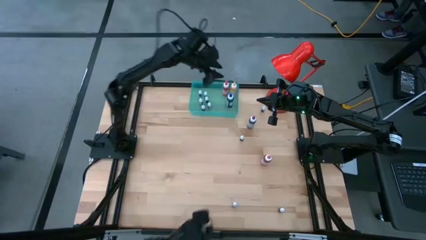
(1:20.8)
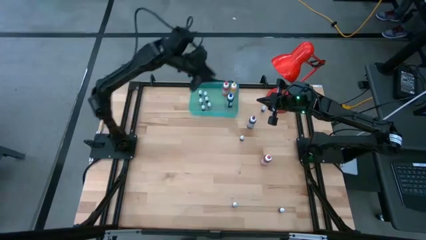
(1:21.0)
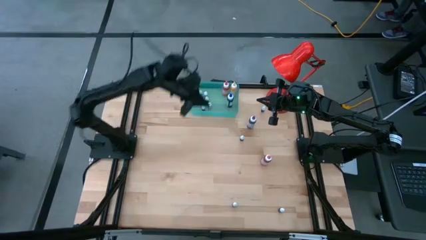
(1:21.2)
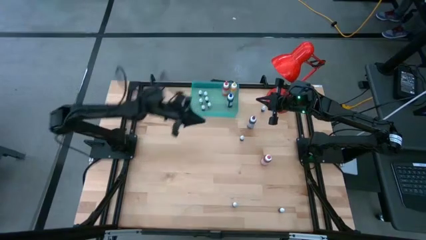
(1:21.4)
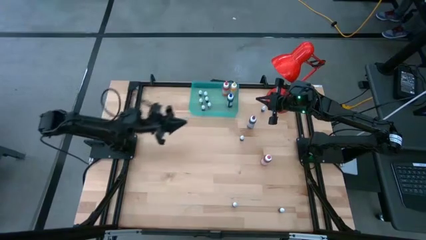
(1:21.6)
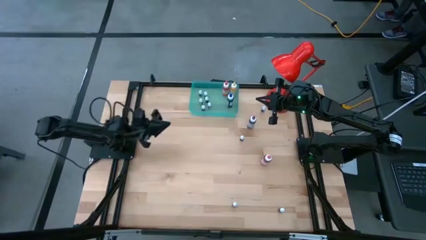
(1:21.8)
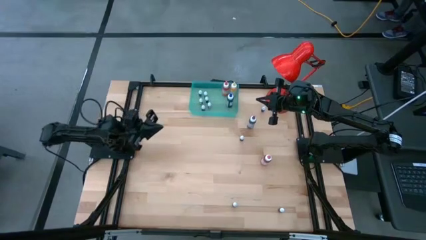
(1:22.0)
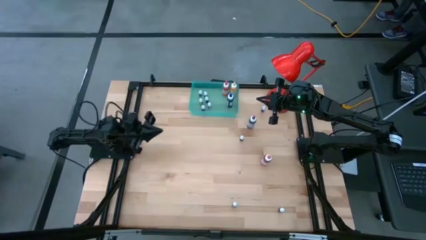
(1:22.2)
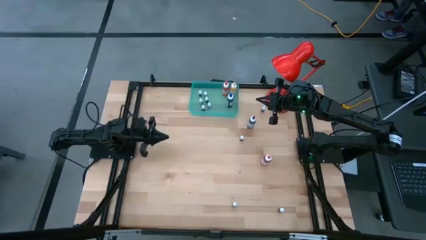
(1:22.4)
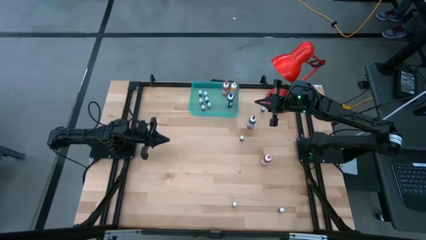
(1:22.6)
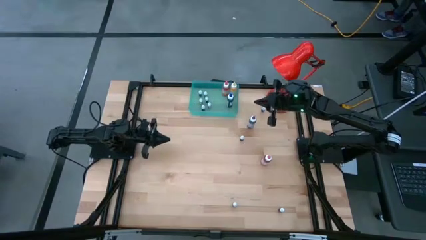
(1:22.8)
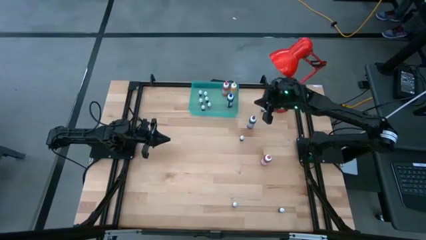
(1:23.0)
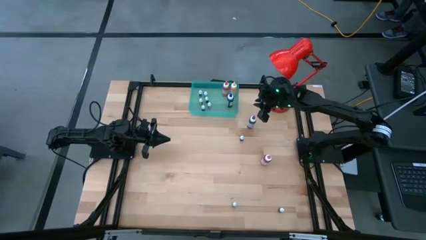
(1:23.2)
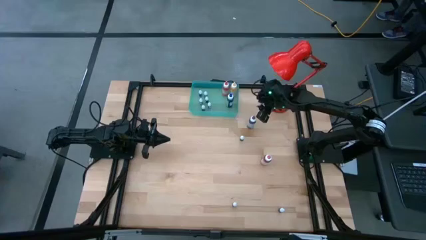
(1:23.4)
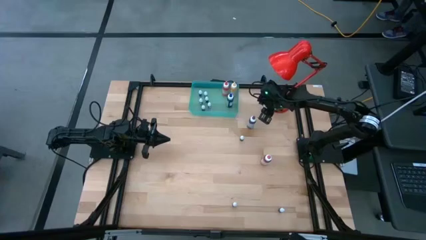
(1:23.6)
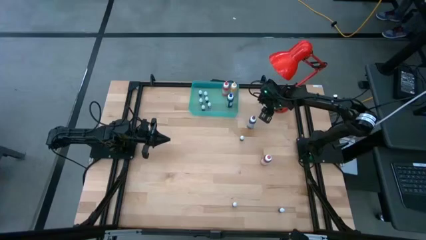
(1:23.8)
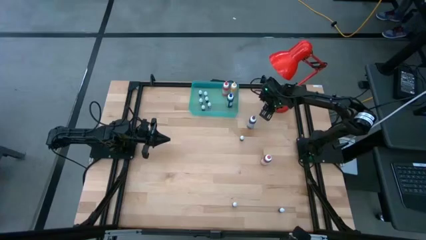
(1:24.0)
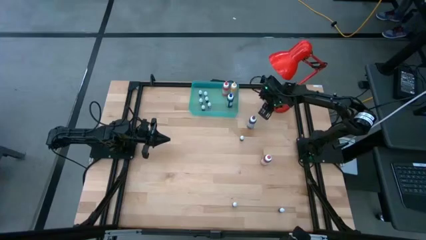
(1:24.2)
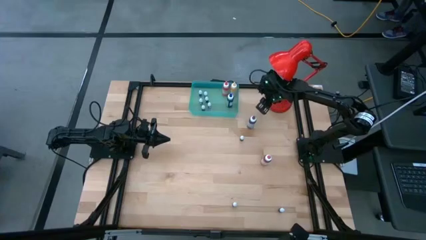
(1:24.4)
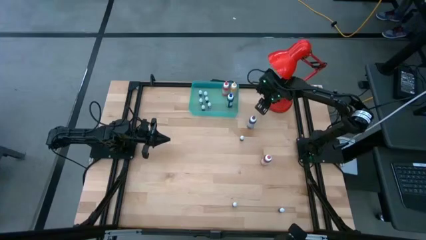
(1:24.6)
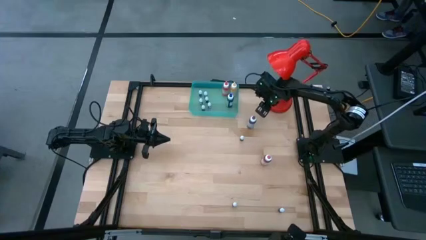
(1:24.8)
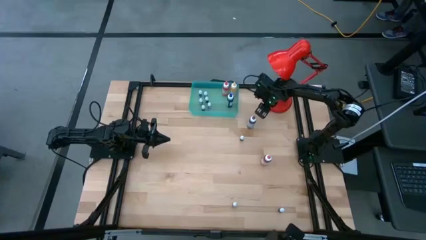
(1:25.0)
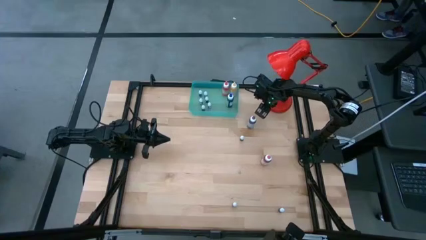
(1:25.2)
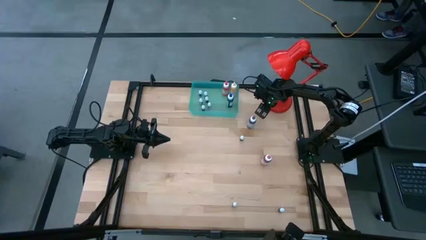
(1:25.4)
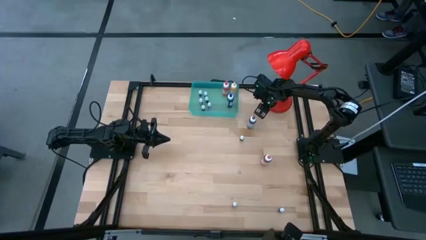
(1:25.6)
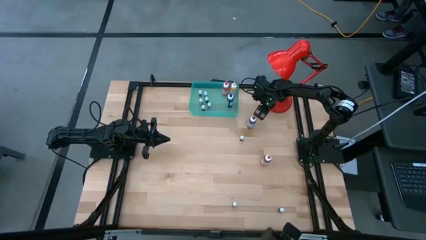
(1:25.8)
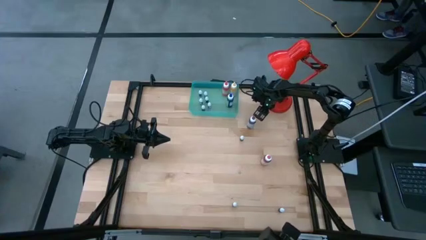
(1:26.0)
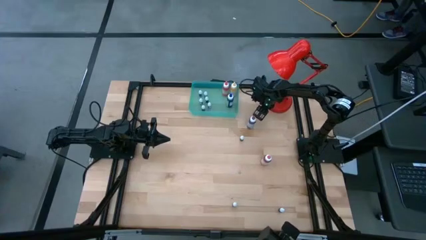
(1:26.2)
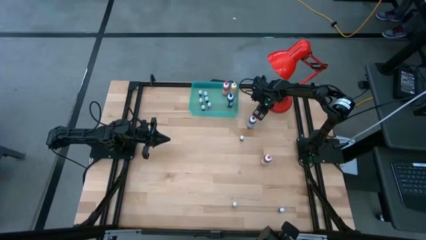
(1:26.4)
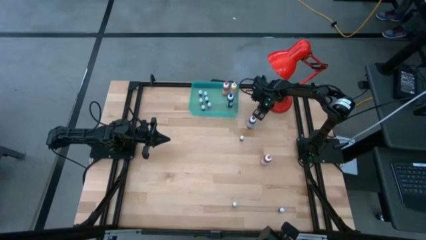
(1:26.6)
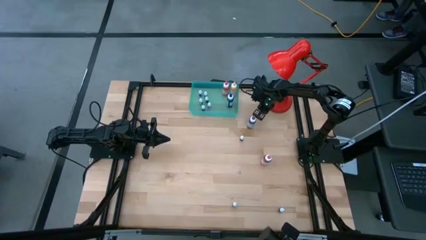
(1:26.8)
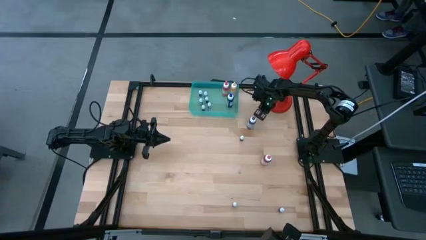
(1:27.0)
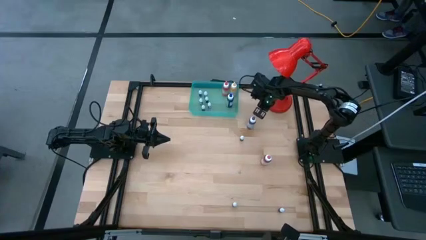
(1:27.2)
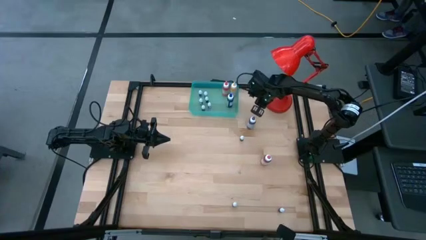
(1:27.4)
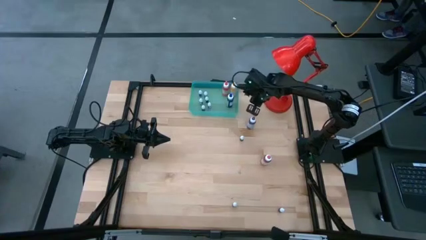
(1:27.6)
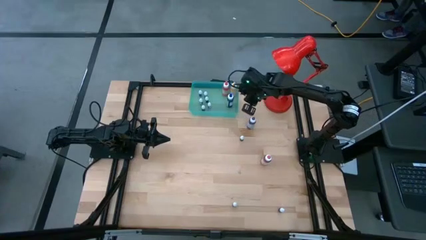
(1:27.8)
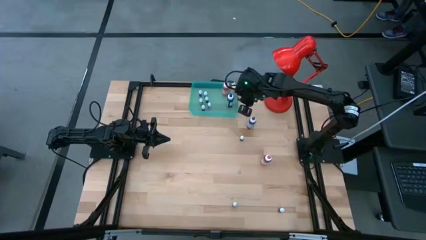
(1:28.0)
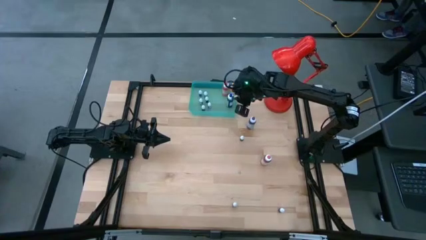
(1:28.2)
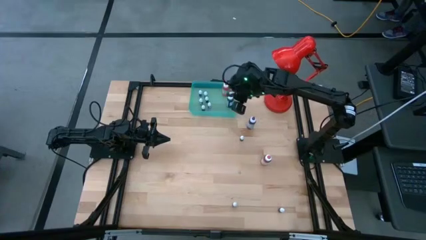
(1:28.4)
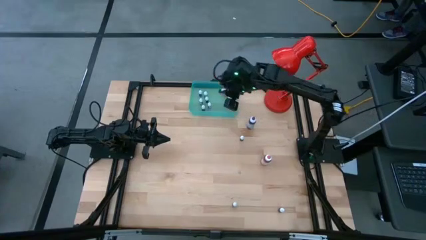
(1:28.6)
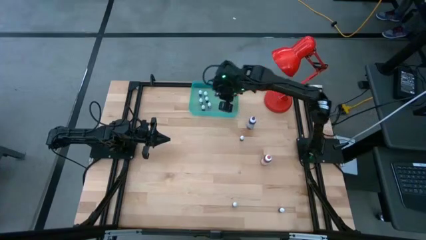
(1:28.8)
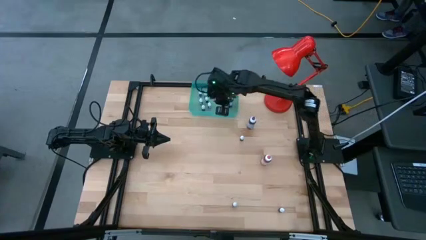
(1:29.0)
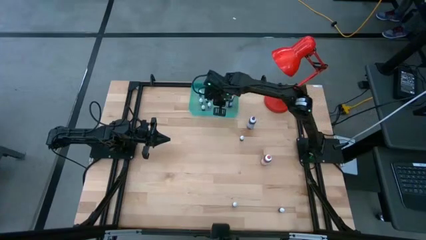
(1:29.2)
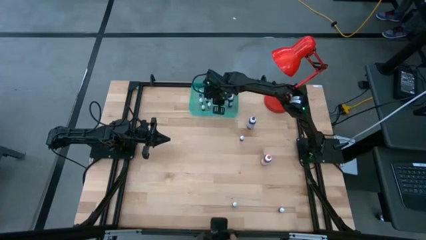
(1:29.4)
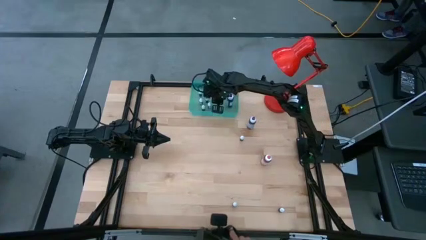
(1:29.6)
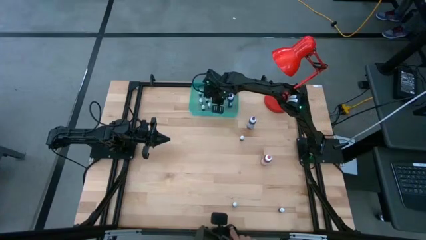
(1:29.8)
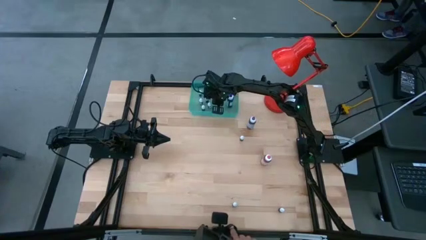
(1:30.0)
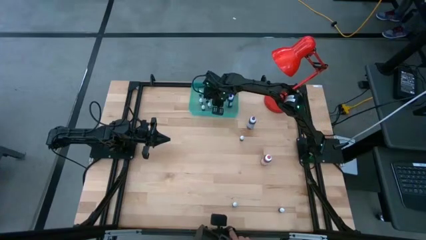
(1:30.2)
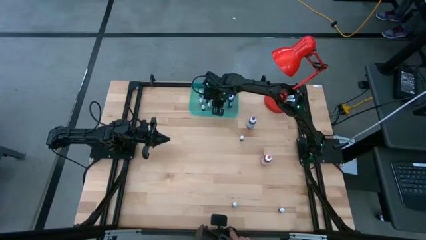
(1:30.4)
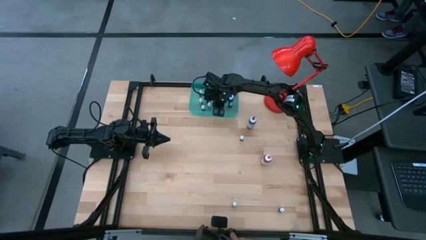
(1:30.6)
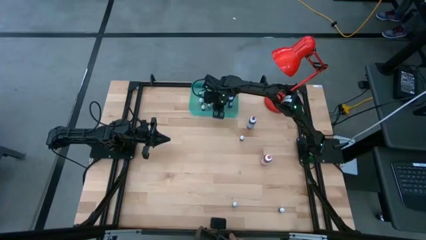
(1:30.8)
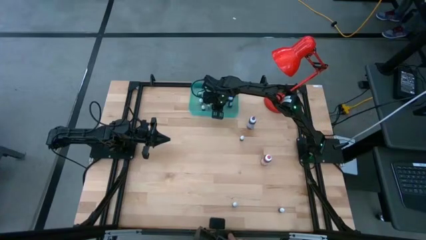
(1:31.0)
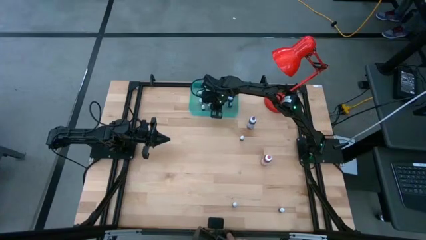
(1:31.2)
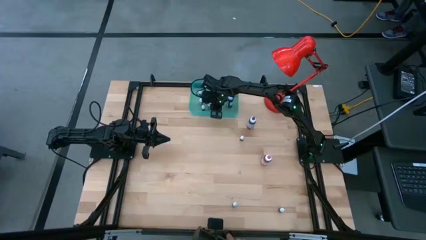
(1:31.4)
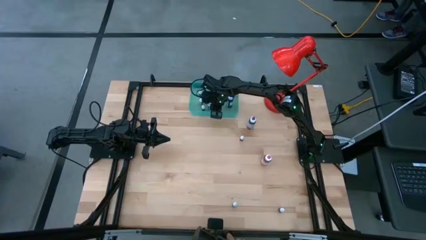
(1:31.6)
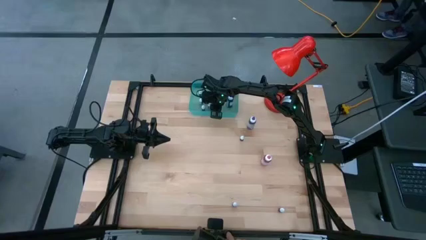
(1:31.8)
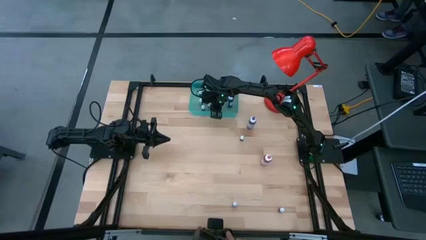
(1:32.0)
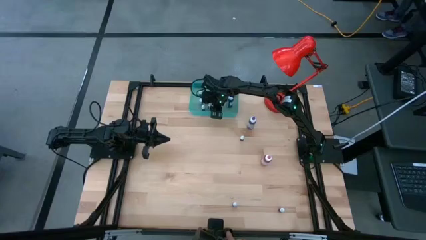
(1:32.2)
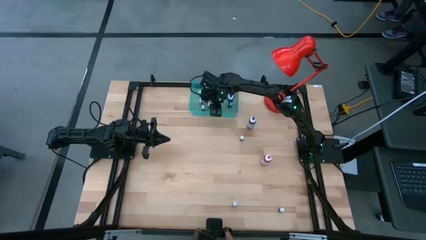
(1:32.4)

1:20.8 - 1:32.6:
Task: Pick & Place food coloring
Put the top right small blue food coloring bottle into the bin

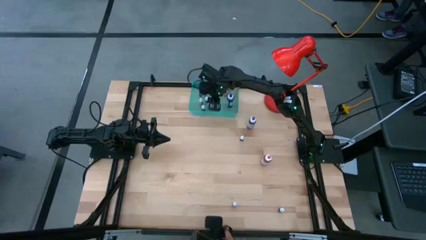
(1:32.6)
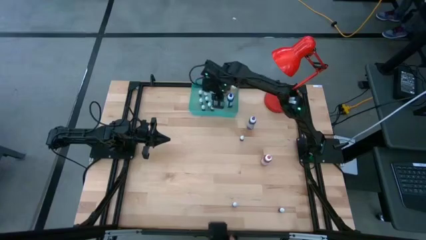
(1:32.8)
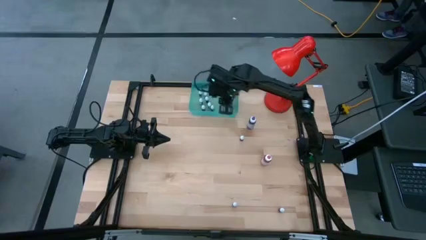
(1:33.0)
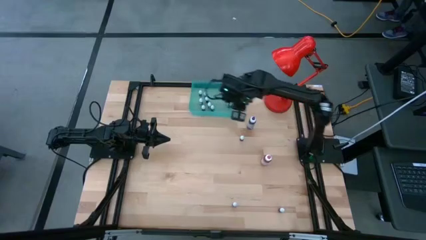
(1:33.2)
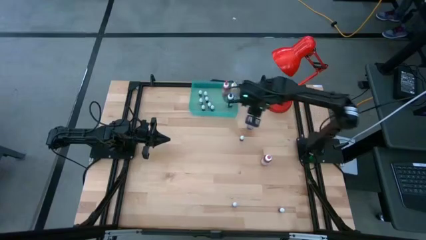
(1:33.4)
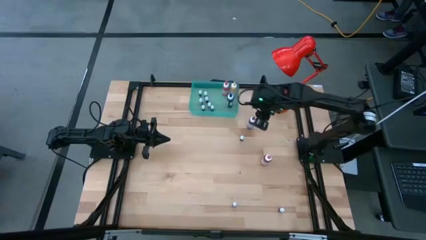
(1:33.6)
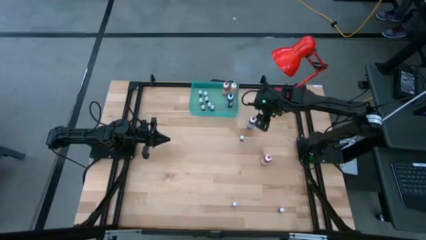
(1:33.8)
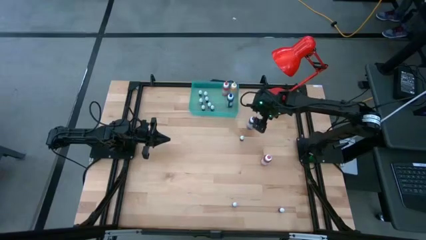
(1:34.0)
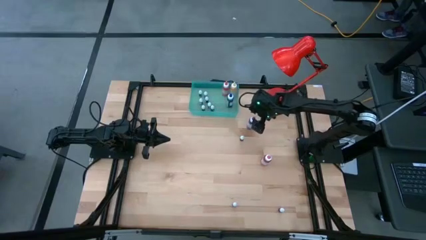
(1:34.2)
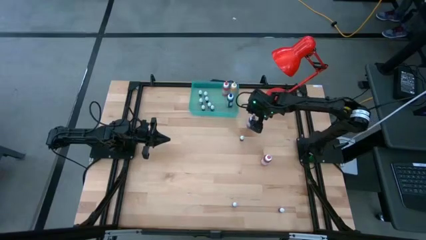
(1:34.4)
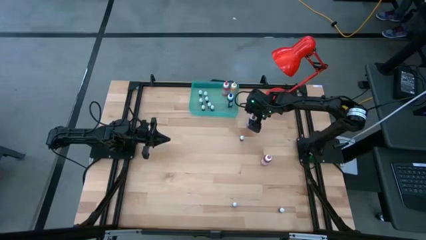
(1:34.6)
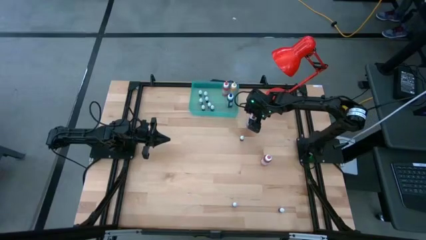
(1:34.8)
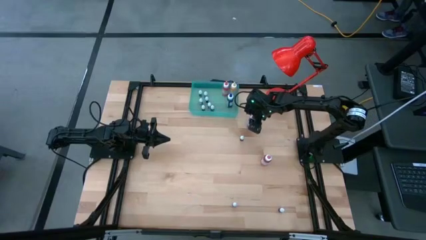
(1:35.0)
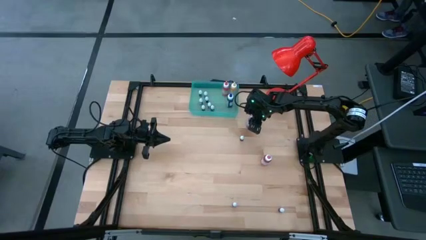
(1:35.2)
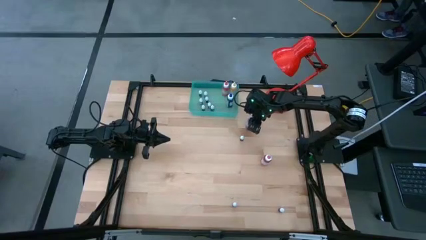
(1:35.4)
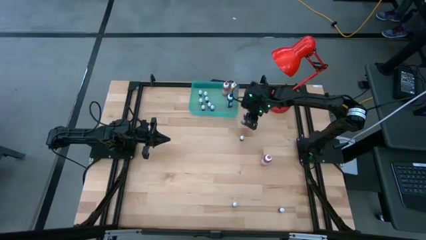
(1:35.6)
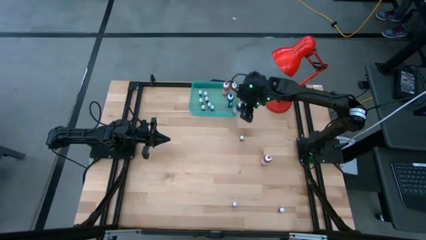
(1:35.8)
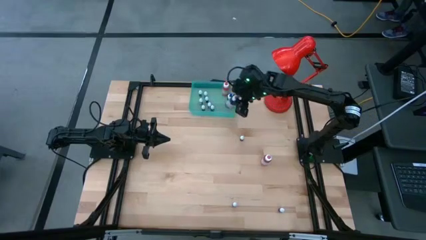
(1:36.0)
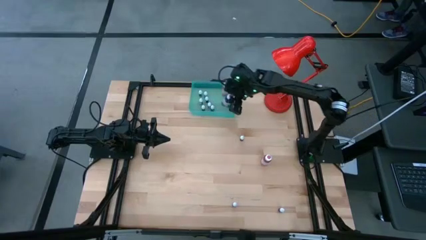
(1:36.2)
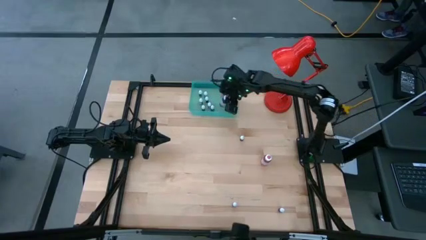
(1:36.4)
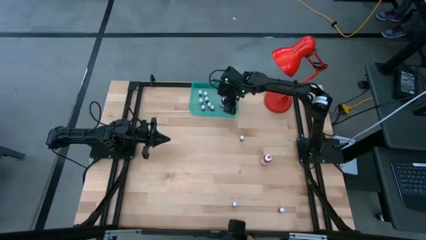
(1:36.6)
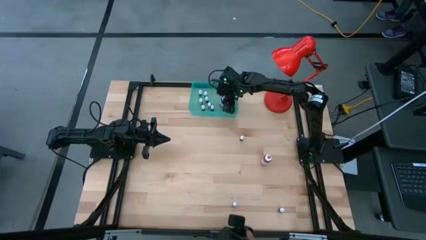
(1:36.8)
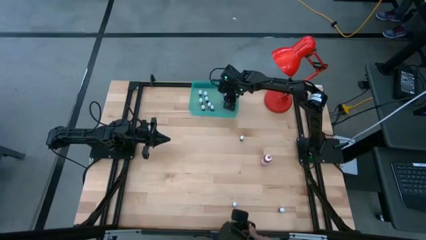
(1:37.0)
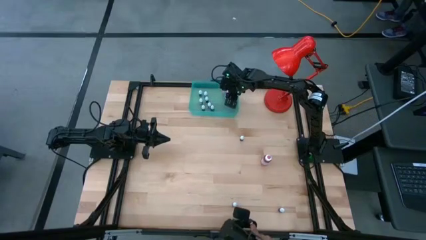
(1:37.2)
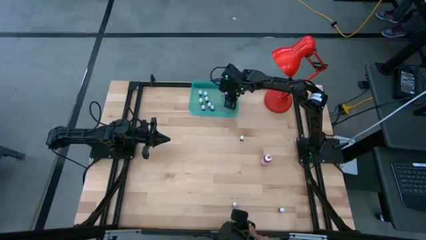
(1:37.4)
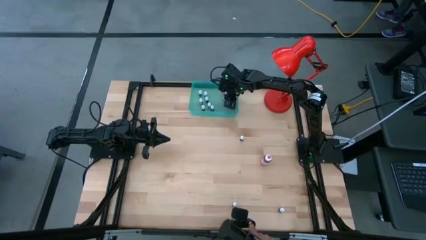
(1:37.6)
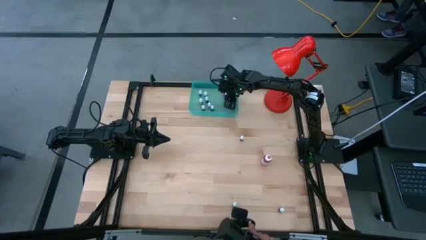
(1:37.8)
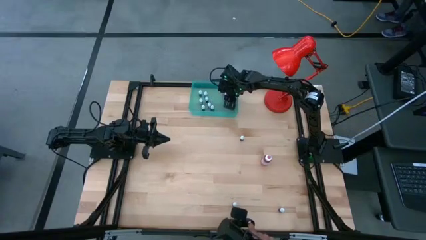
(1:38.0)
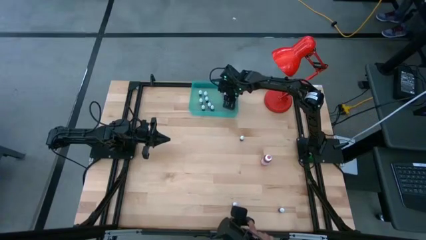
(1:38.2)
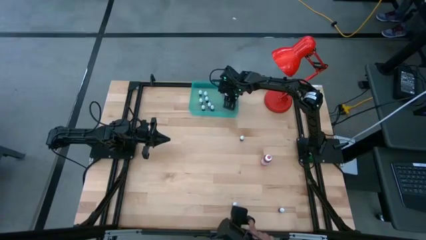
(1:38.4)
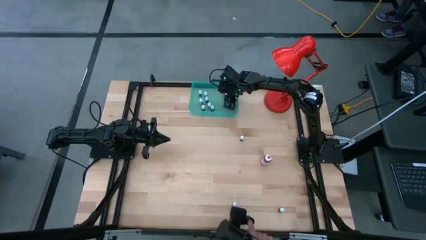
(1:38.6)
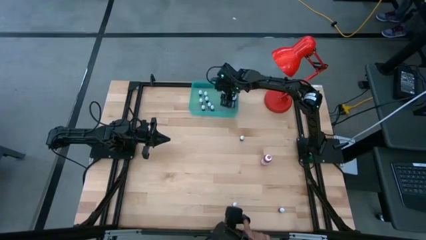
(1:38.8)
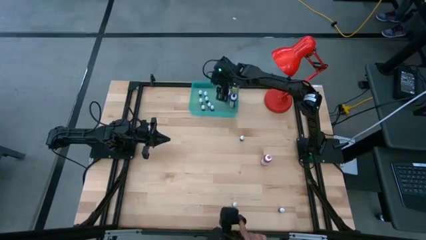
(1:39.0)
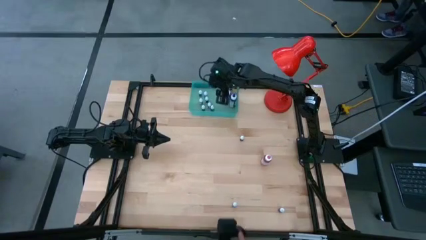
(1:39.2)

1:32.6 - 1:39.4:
Put the purple food coloring bottle into the bin
